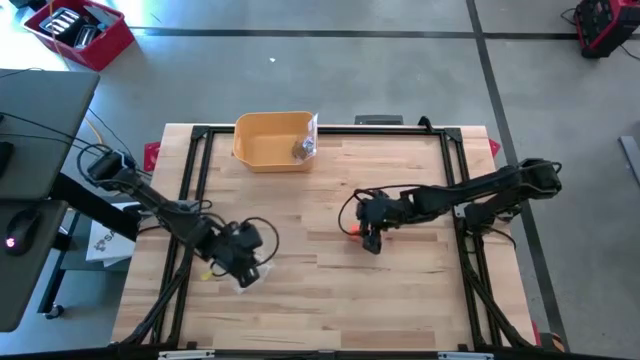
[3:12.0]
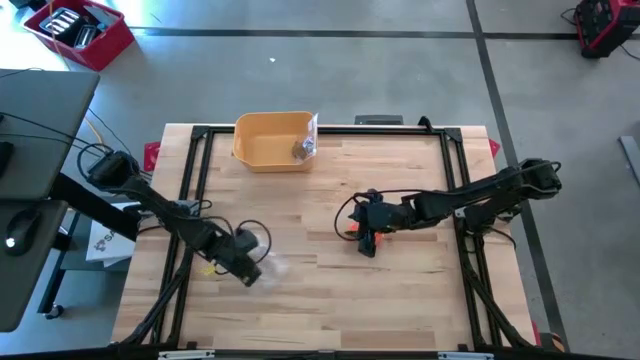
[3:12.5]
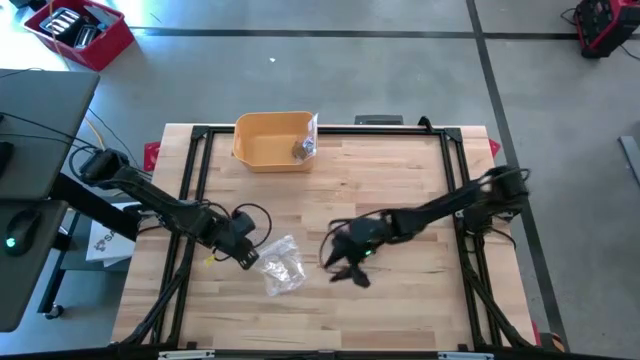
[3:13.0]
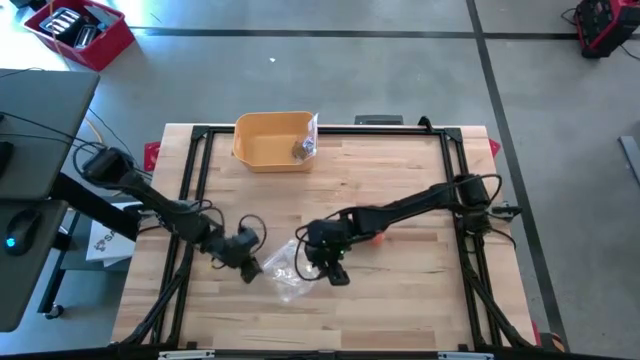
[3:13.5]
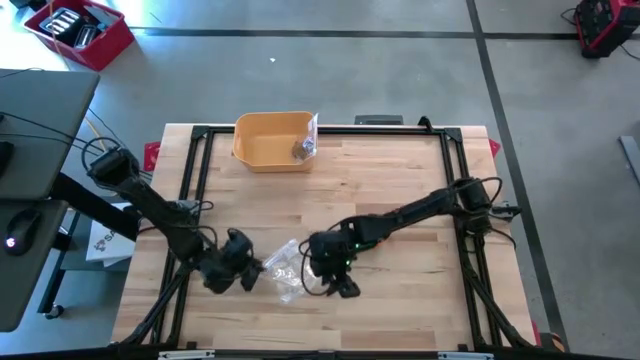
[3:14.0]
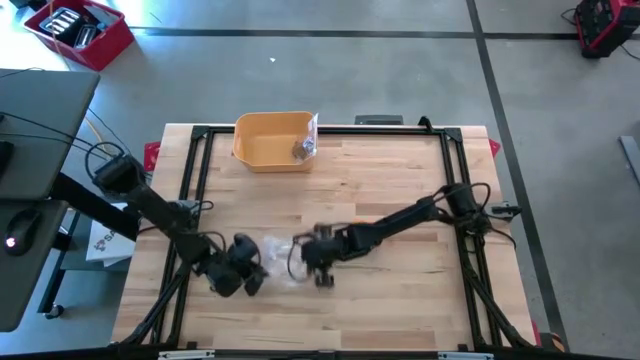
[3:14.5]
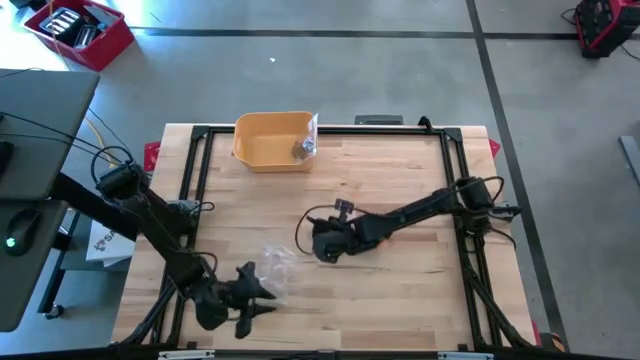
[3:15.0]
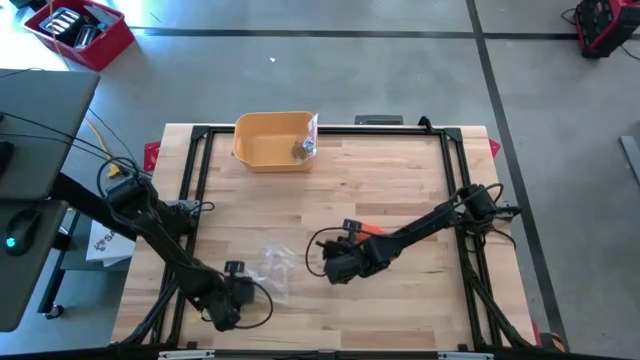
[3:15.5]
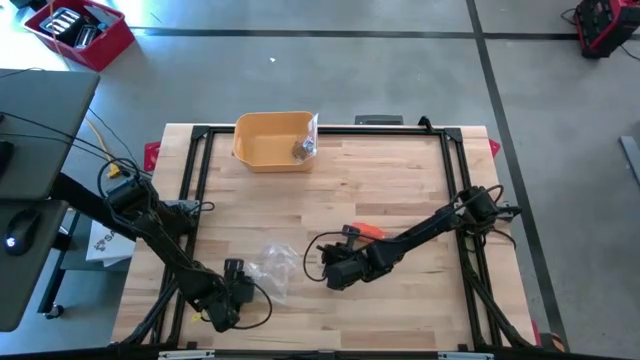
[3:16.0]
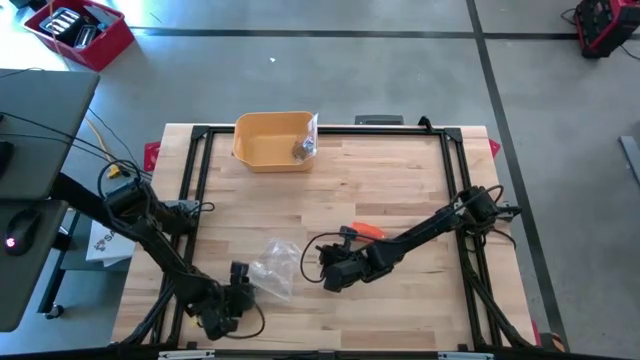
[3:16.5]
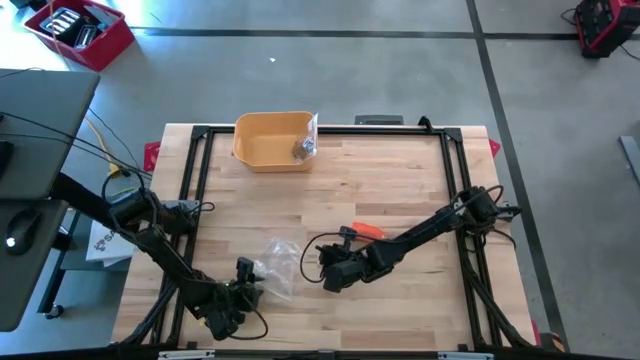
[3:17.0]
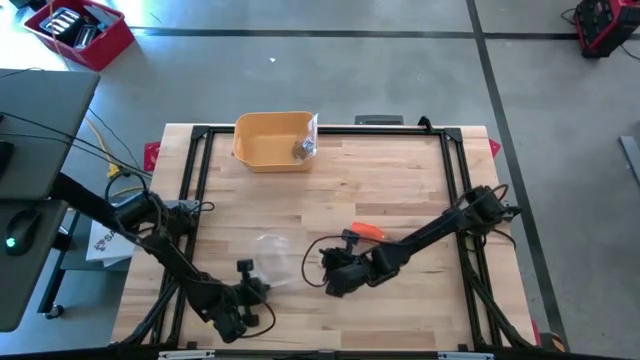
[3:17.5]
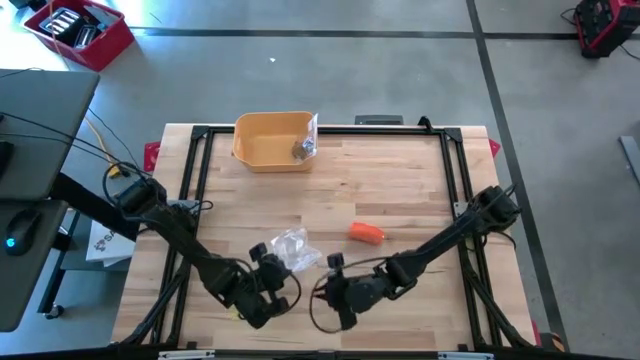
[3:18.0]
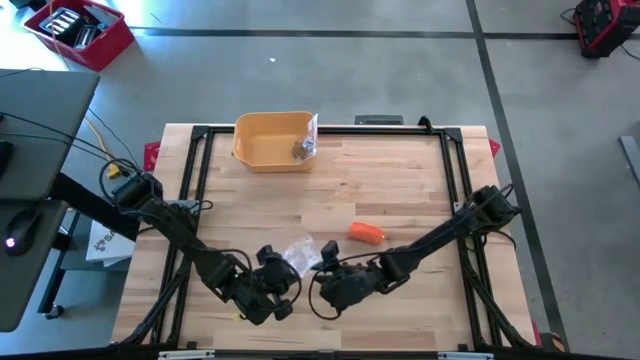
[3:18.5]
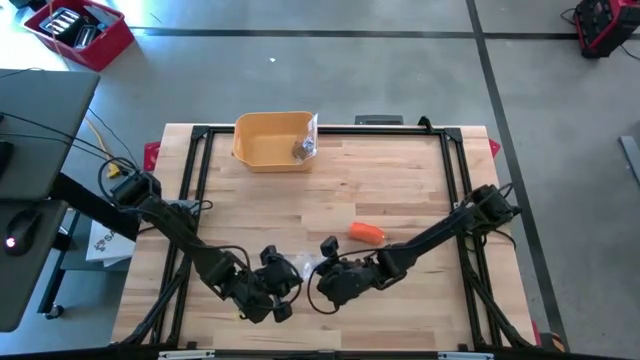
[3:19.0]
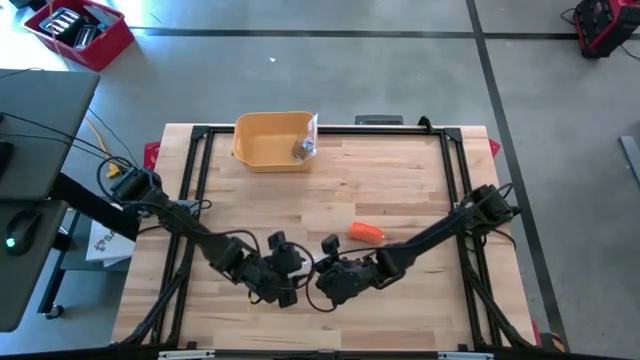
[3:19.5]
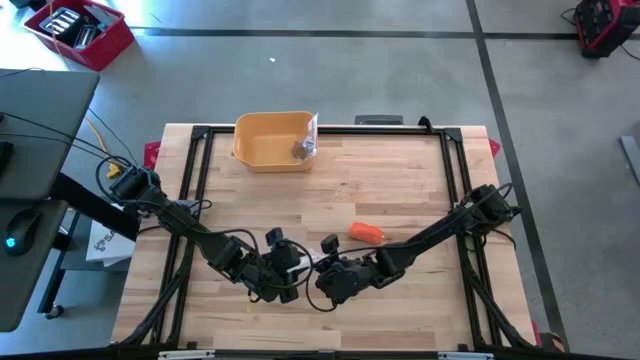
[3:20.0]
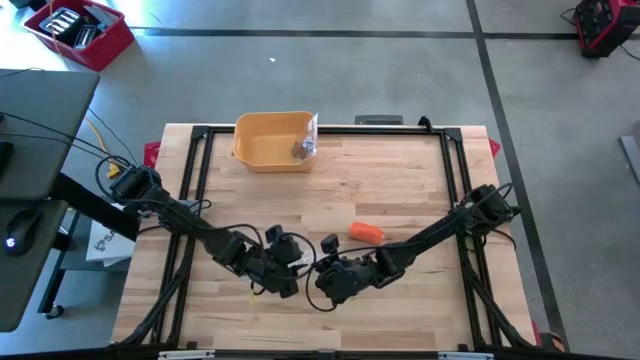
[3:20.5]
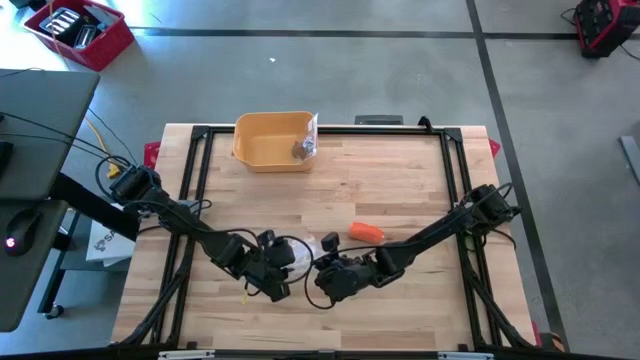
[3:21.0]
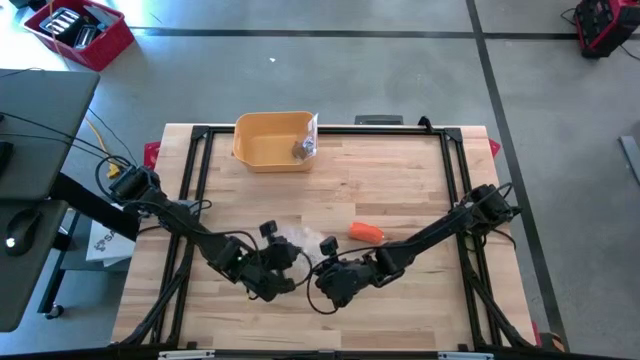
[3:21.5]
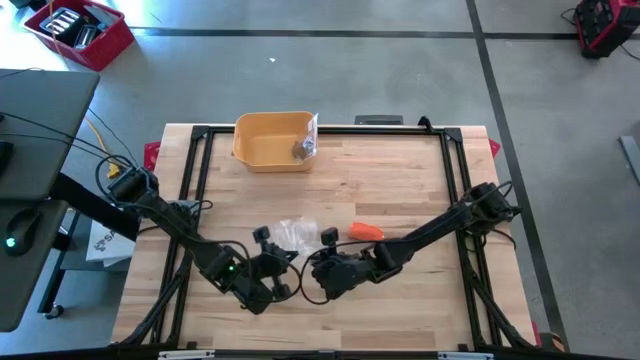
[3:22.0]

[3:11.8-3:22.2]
Task: Roll bandage
Open the transparent zip bag

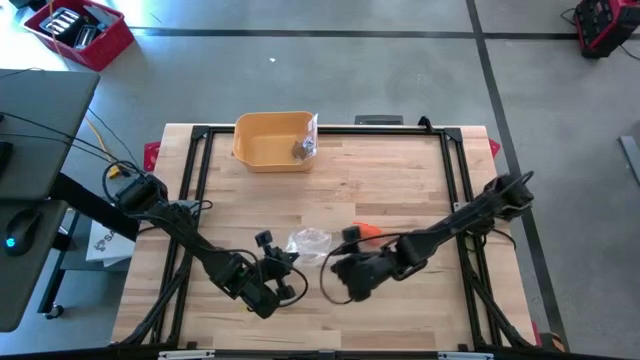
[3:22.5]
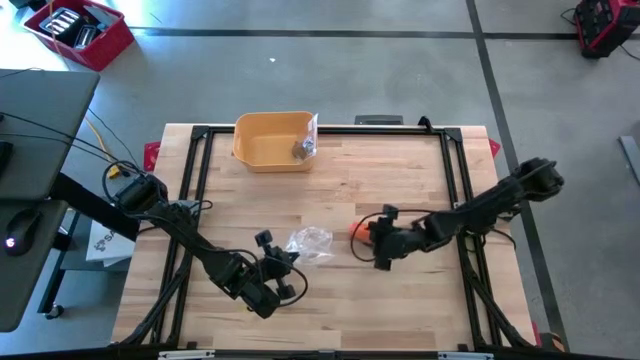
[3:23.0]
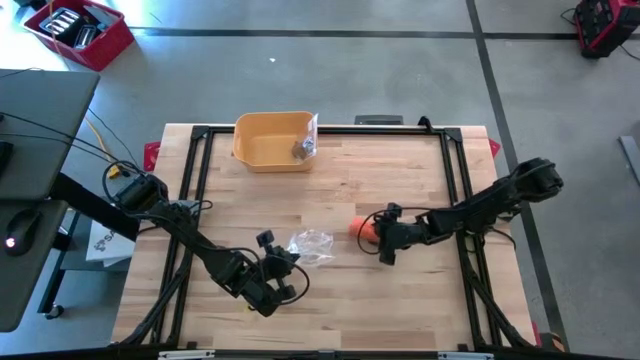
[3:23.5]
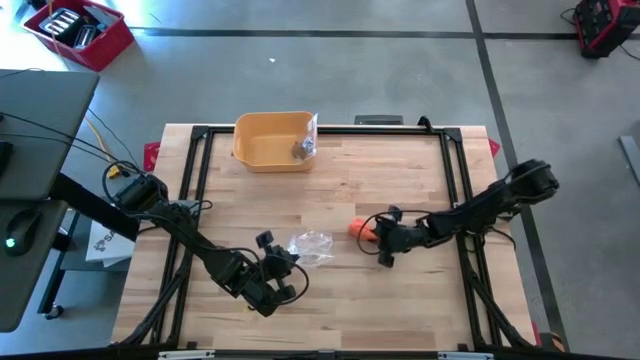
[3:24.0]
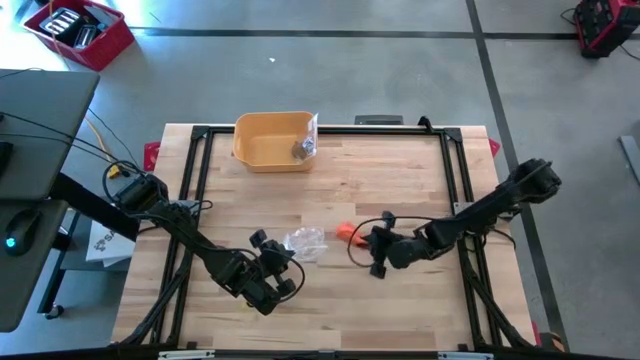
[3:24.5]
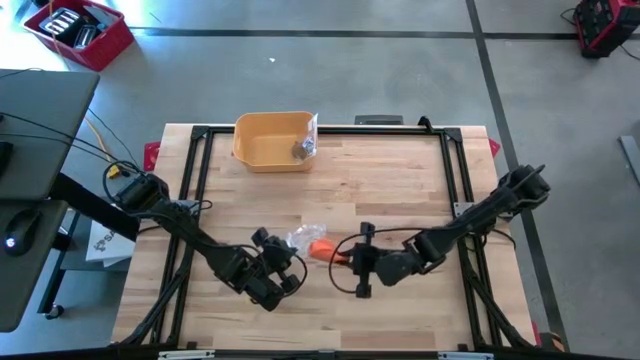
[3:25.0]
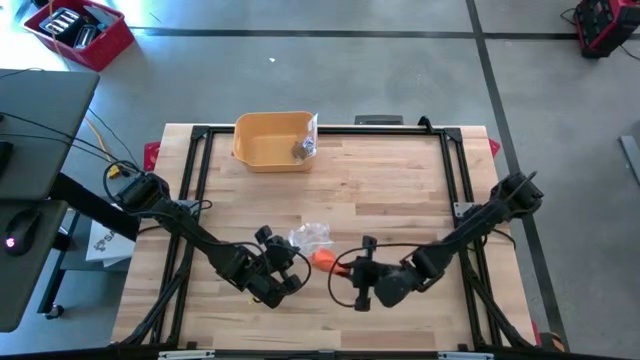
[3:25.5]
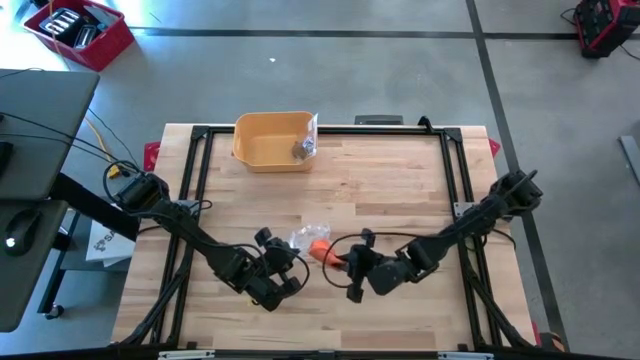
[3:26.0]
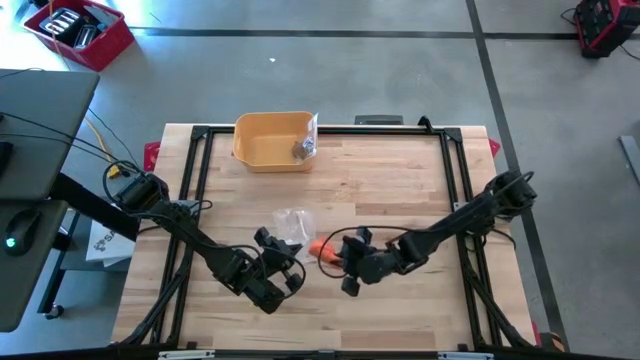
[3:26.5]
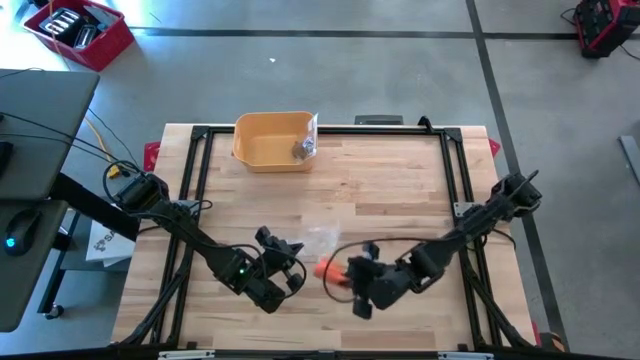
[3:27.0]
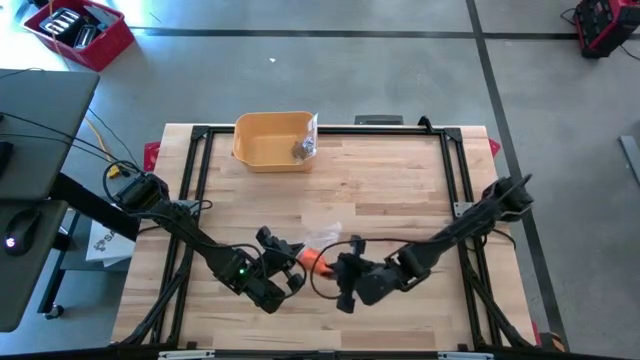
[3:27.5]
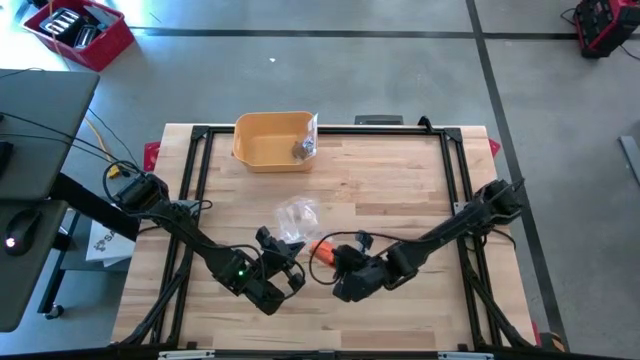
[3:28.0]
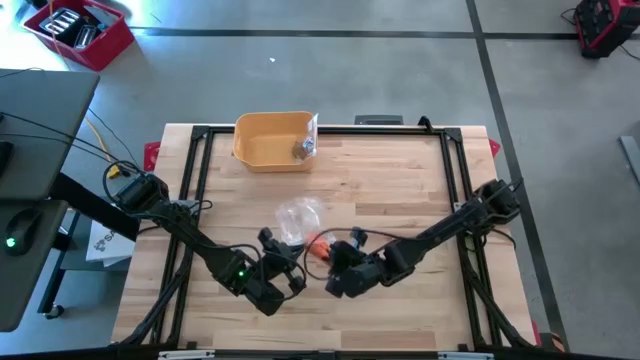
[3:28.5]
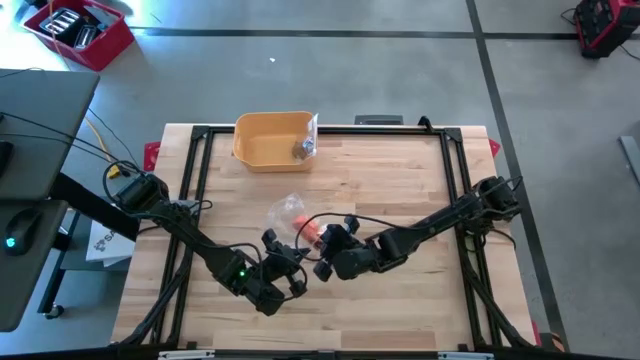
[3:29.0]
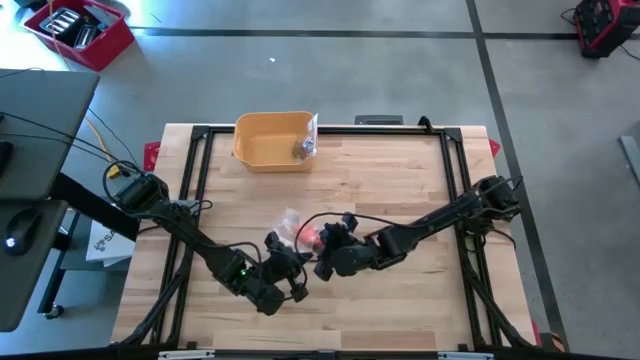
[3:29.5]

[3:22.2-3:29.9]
Put the orange bandage into the transparent zip bag

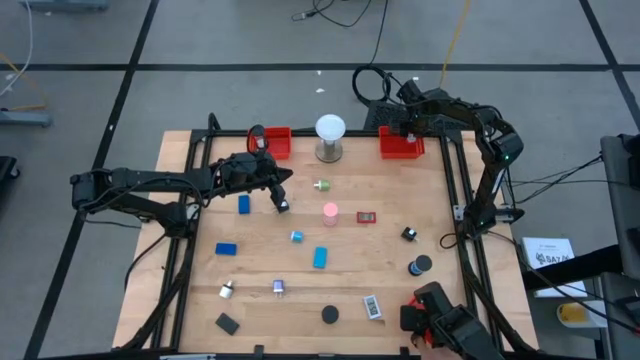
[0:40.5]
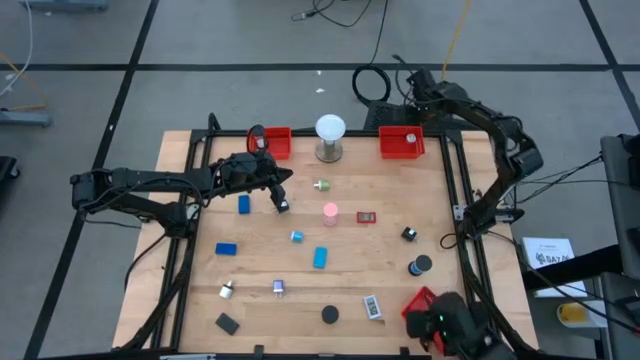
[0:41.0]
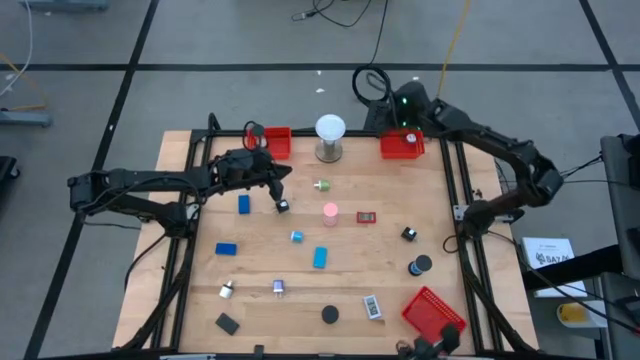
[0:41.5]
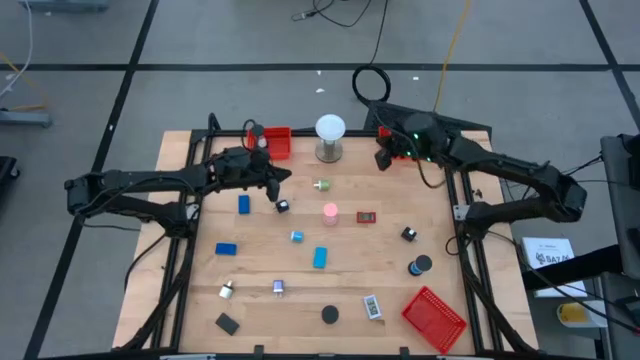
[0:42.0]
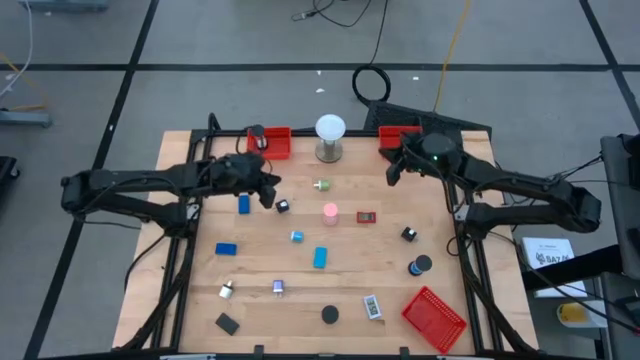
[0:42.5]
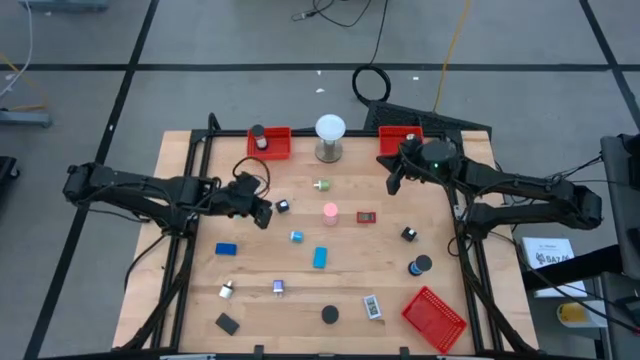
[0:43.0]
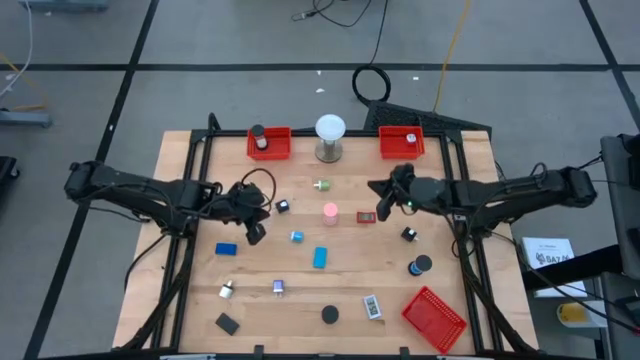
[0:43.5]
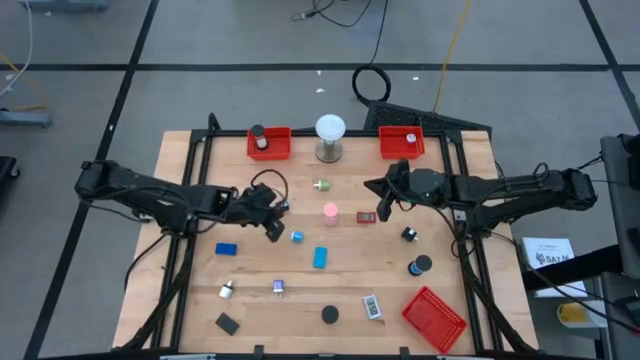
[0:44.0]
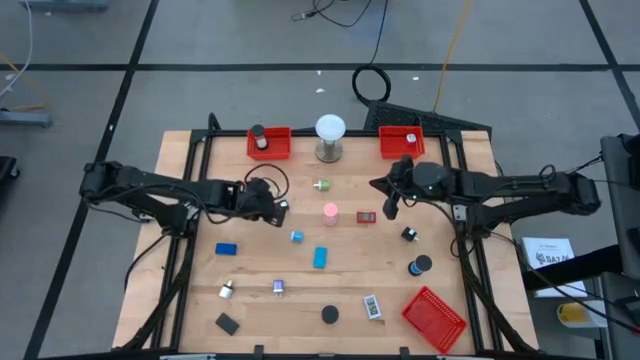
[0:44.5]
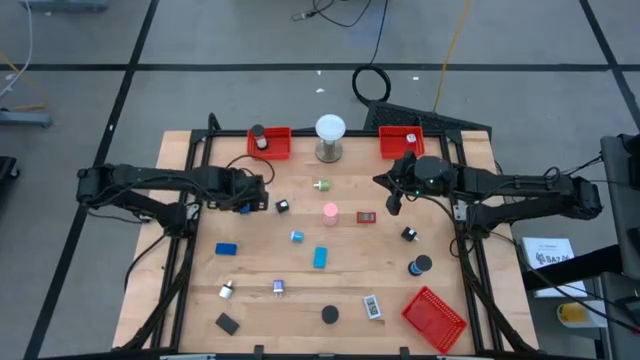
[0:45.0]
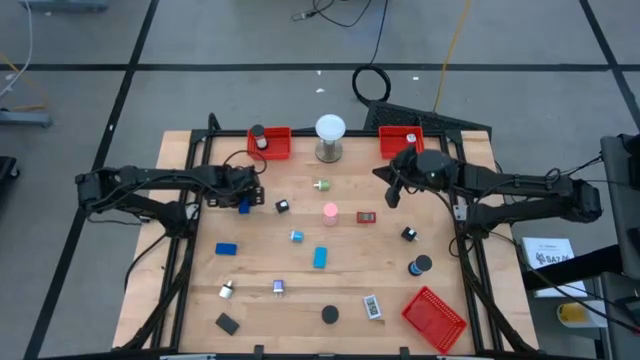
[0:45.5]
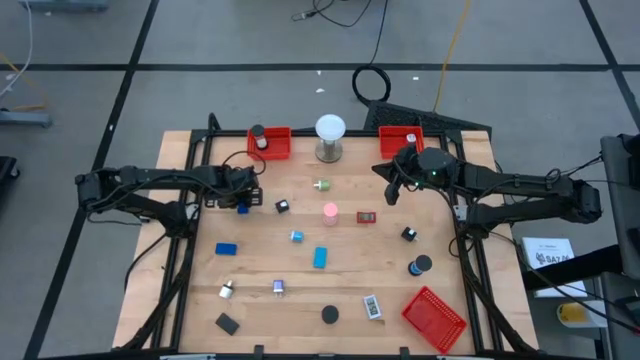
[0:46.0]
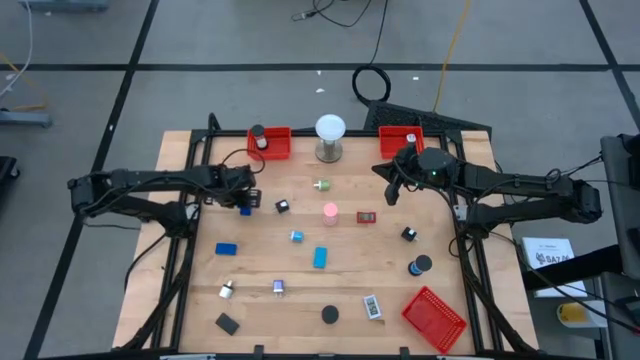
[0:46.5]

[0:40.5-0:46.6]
Task: Pick & Place Office items
Put the blue digital clock into the bottom right red bin
